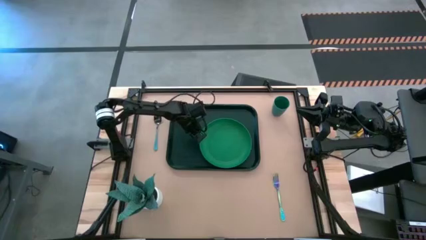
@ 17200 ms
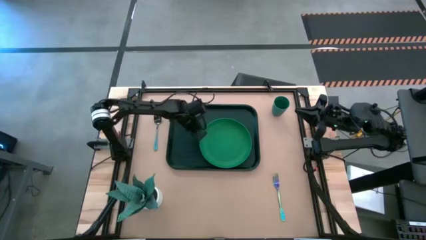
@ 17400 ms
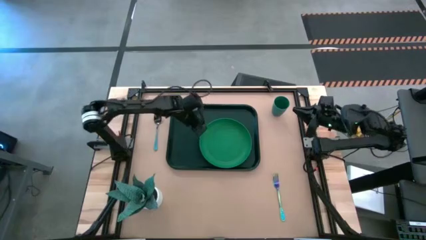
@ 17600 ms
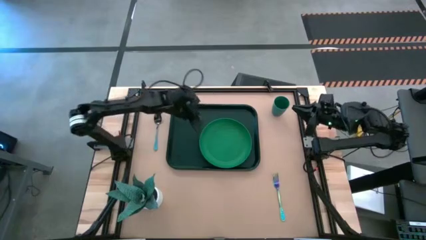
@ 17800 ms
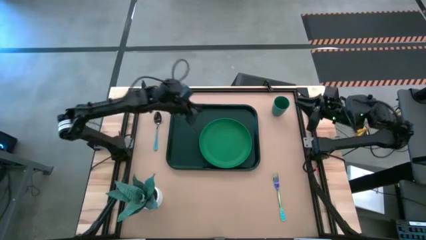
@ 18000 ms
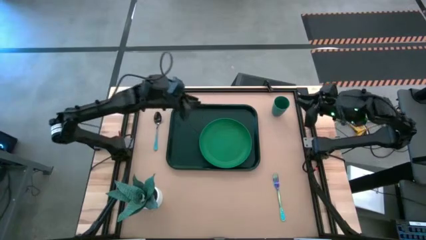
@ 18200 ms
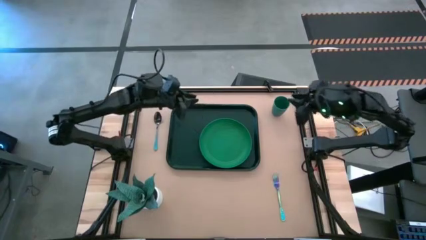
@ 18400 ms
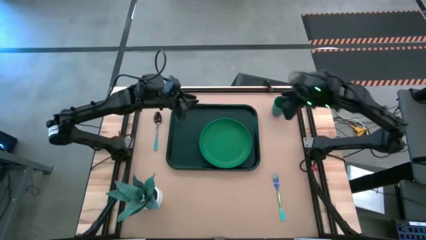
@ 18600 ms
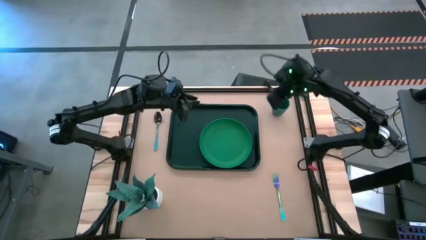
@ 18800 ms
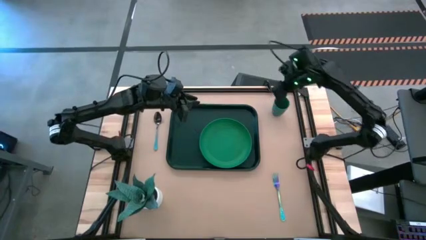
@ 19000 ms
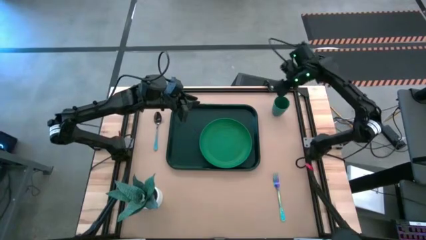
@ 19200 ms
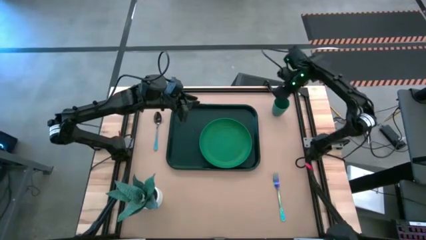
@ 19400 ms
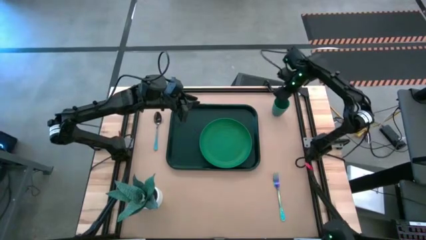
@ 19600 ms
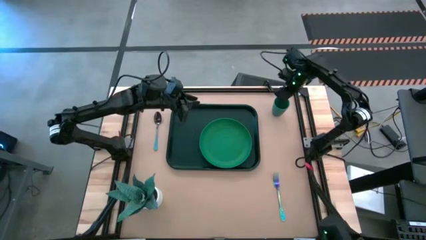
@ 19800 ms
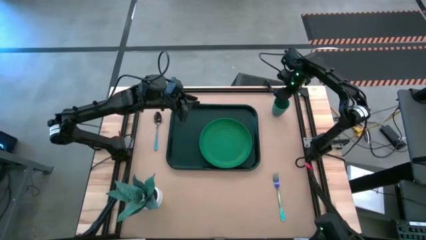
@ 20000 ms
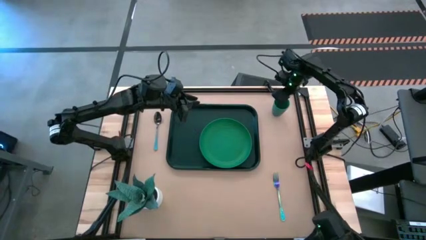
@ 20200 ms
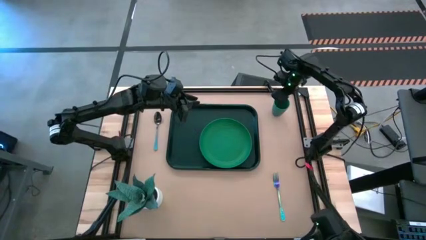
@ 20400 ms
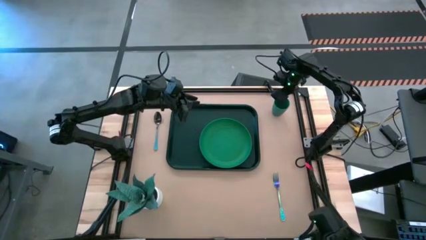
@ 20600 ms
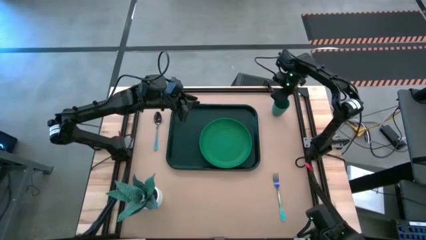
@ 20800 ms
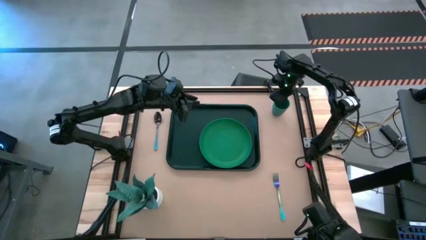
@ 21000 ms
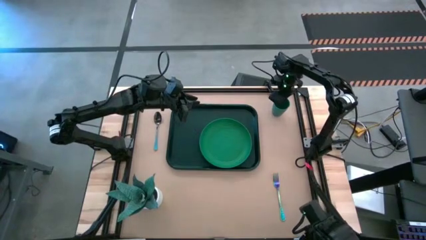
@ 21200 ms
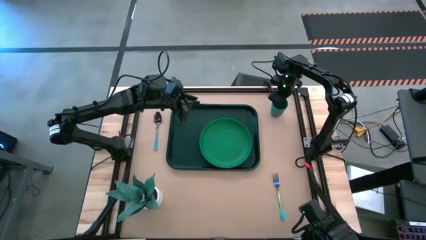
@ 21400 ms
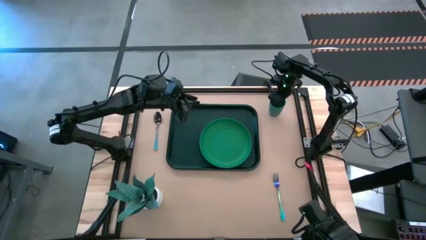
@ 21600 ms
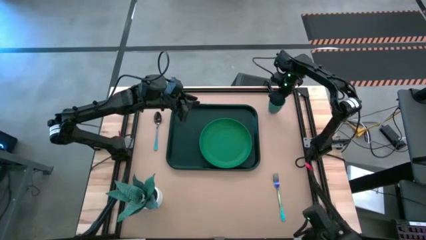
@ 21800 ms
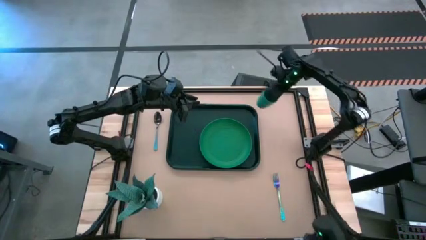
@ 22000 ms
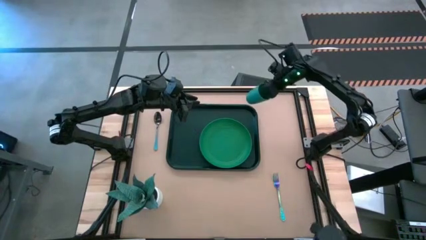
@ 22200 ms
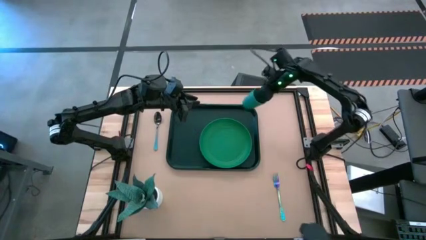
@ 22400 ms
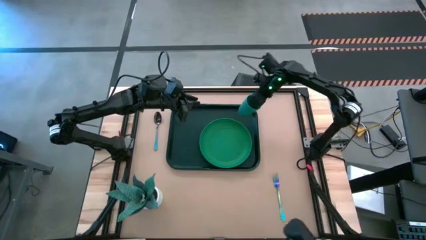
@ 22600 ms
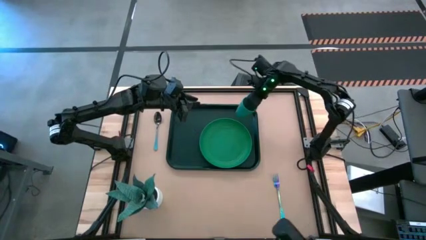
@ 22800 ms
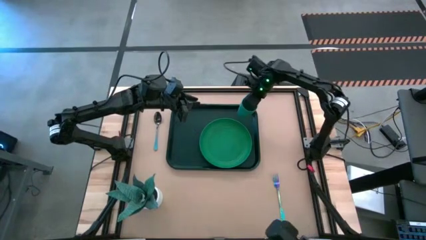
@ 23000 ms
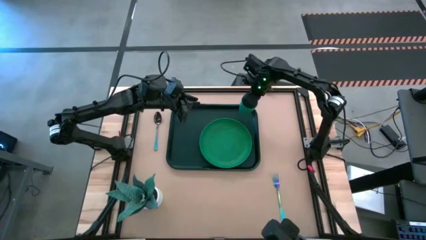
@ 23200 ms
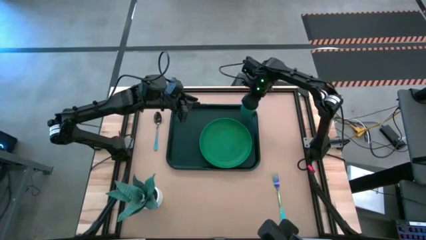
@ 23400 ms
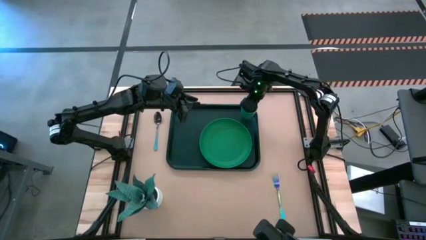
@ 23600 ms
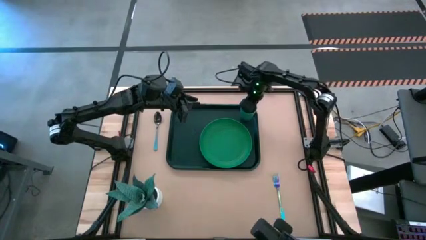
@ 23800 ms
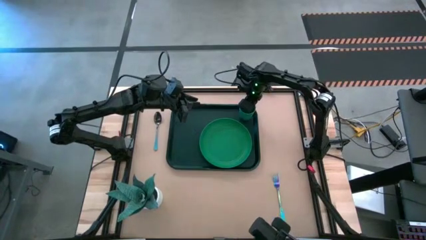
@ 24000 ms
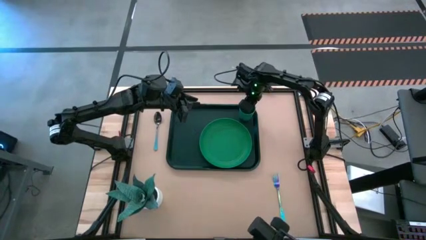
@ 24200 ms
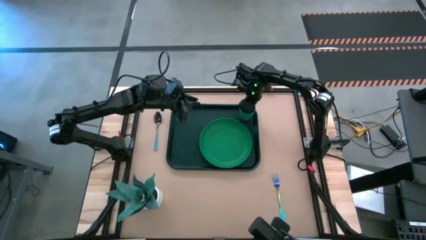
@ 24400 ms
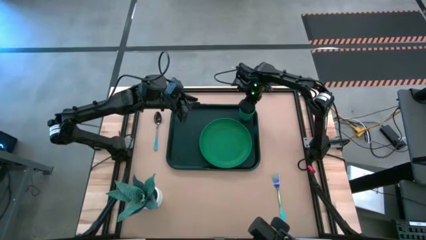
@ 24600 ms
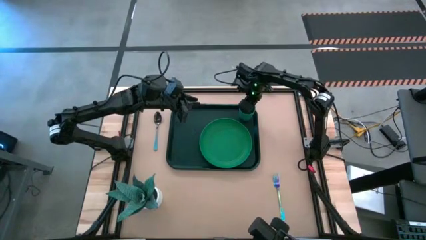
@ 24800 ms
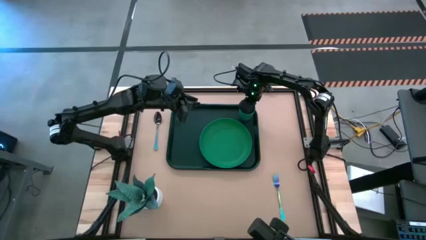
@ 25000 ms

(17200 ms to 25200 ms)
Task: Pick and place plate/cup/fork/spoon on tray
Put the green cup on the dark green tray to the top right of the green plate

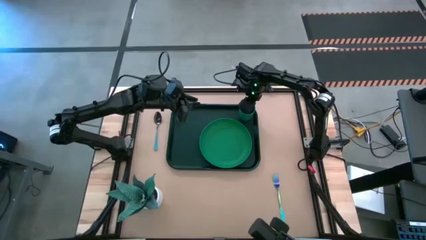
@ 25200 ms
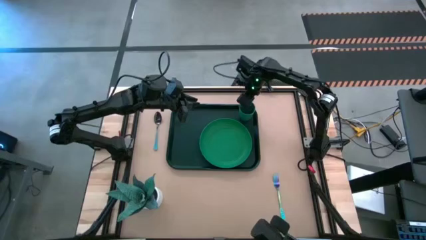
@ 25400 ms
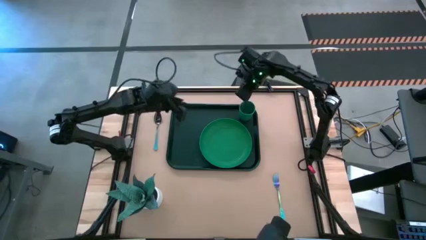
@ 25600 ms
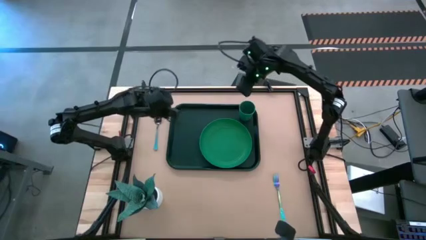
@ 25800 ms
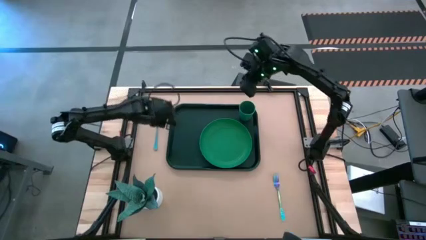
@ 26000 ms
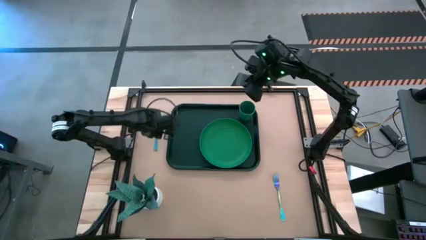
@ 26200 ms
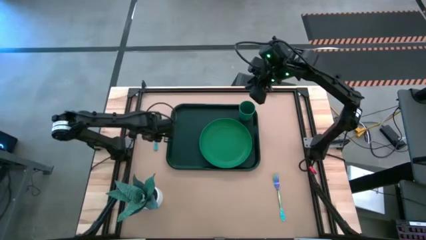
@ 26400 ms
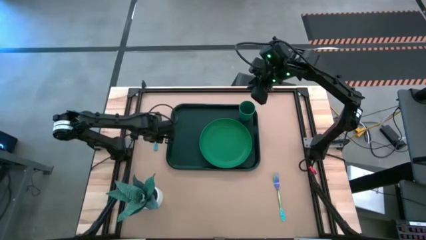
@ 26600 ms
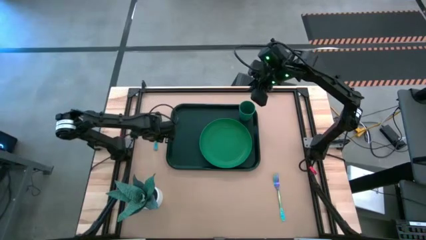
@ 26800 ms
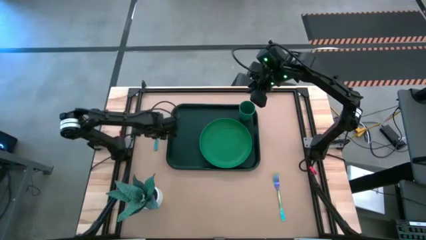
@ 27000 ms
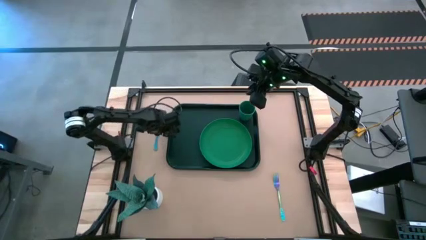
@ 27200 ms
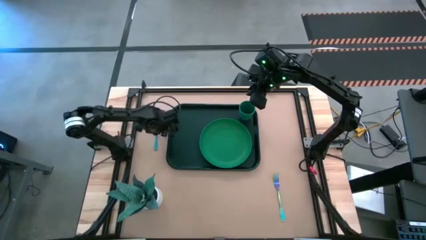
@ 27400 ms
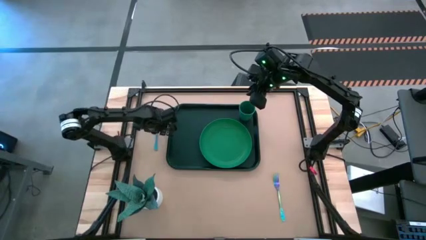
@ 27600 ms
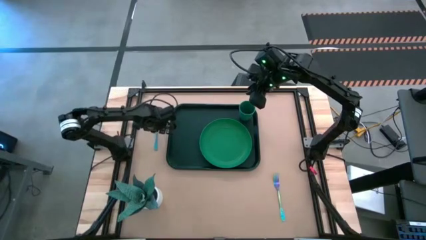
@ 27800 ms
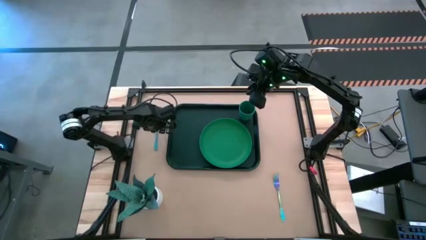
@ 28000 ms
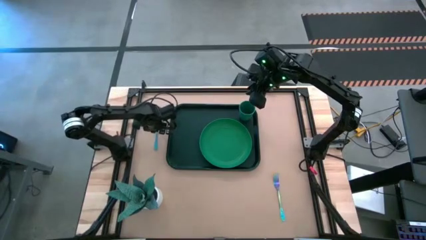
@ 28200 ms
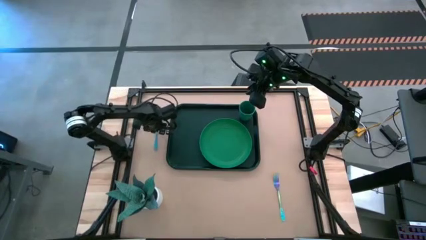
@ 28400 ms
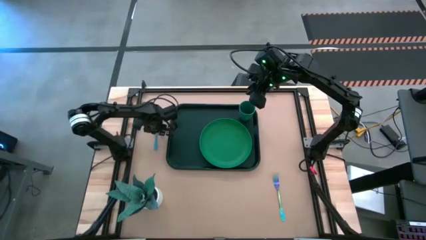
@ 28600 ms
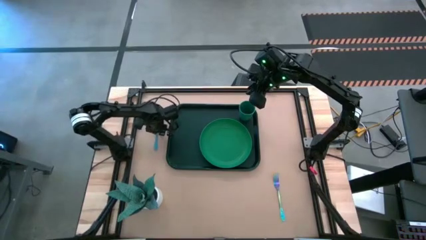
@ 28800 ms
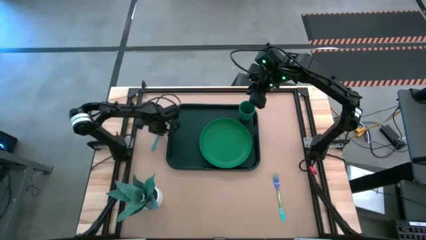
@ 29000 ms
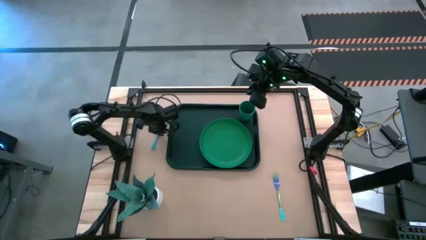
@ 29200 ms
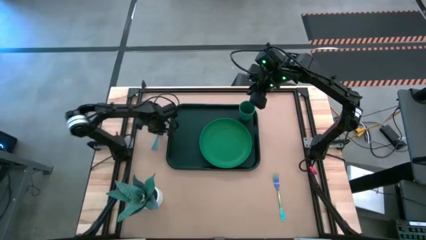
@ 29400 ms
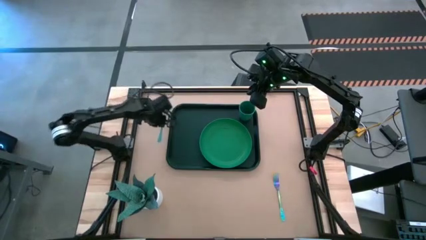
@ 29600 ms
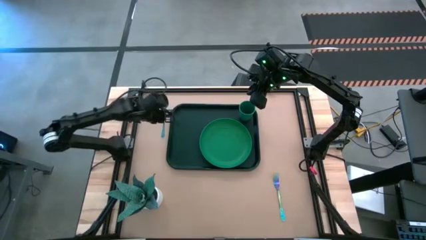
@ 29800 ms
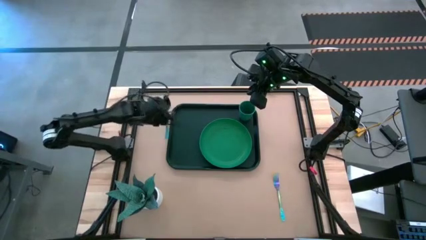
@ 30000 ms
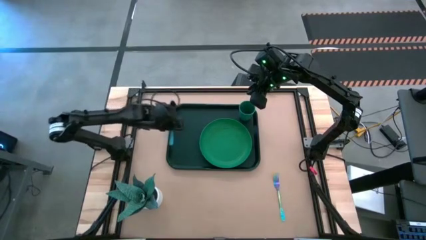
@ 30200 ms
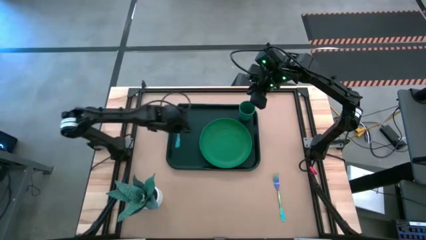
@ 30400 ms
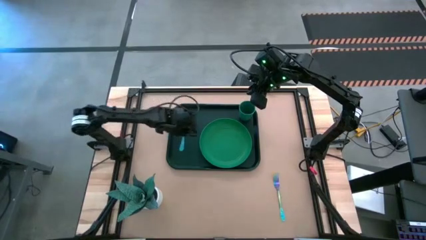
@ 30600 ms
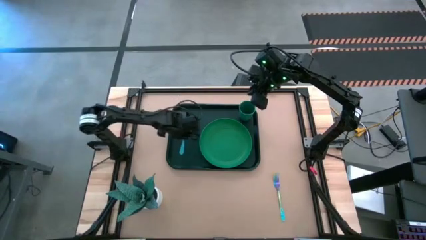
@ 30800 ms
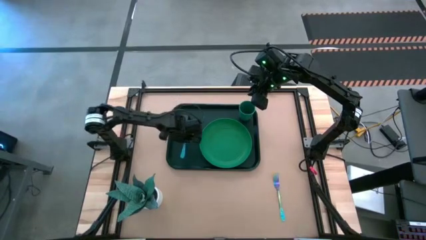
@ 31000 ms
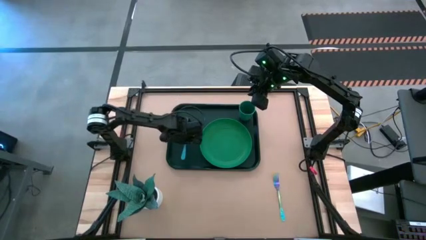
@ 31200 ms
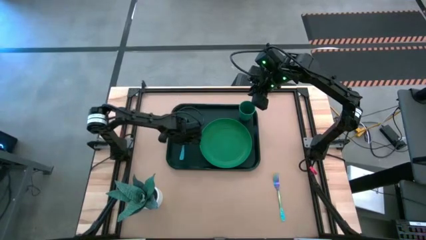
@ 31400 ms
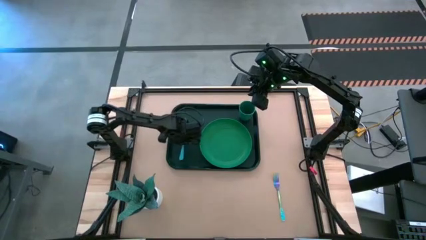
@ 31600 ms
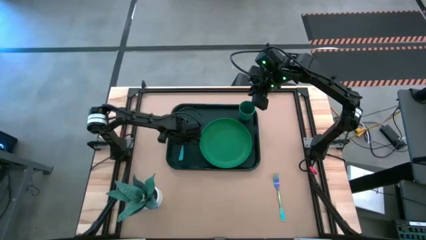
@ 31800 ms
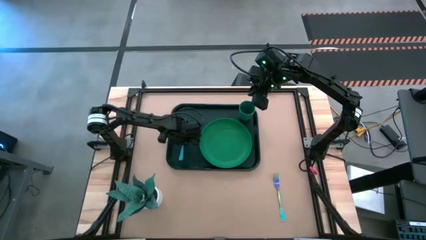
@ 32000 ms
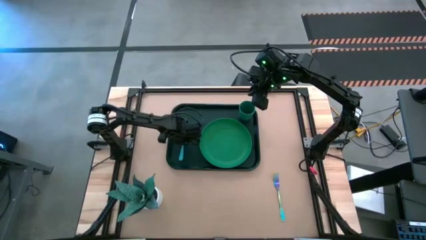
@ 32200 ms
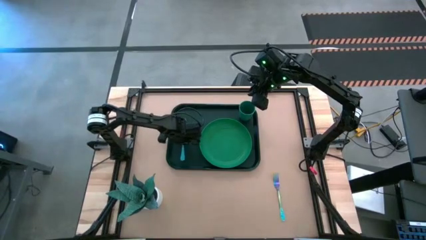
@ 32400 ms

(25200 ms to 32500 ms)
Put the blue spoon on the dark green tray to the left of the green plate

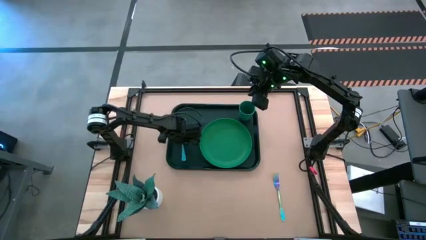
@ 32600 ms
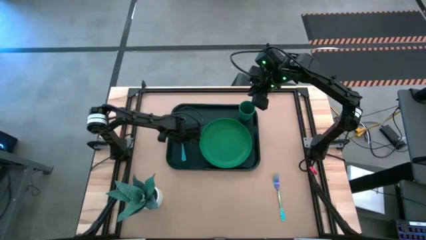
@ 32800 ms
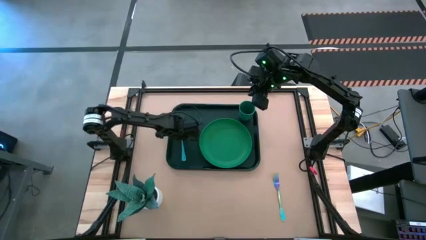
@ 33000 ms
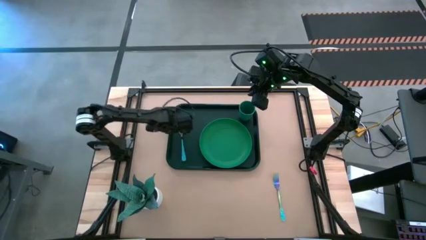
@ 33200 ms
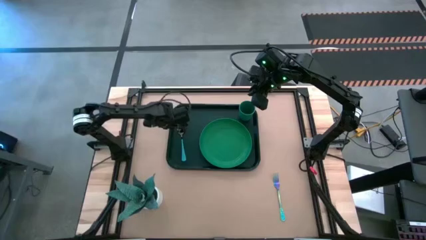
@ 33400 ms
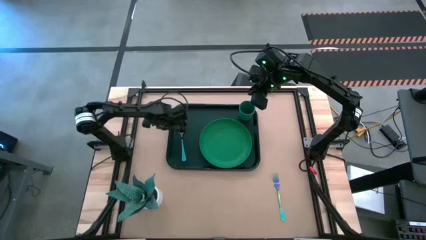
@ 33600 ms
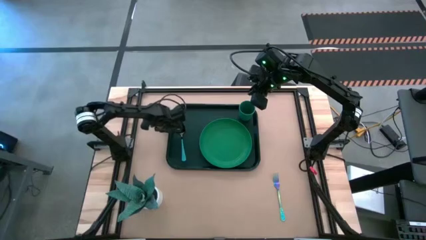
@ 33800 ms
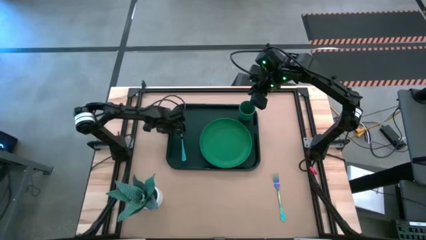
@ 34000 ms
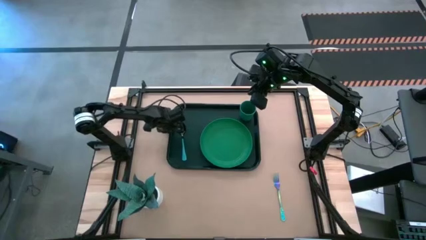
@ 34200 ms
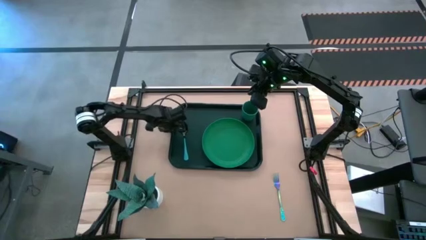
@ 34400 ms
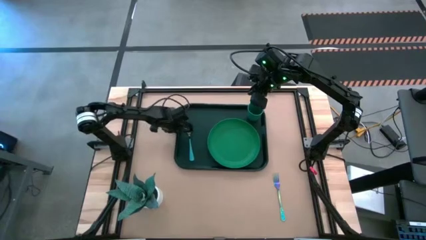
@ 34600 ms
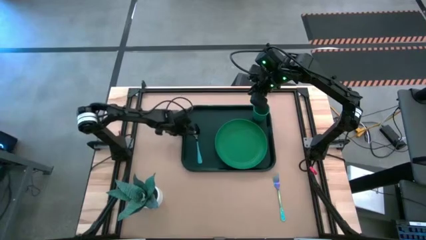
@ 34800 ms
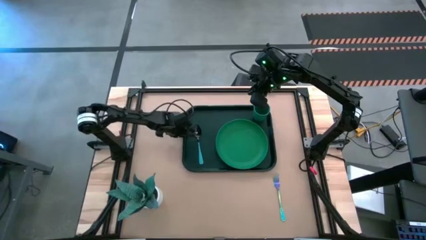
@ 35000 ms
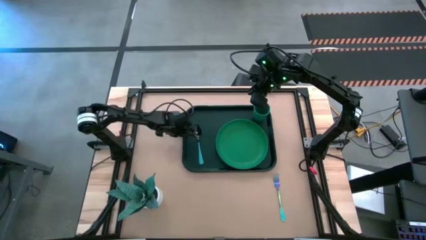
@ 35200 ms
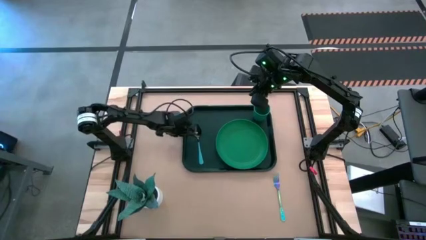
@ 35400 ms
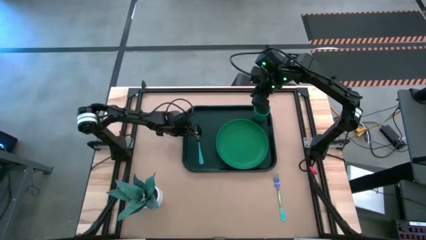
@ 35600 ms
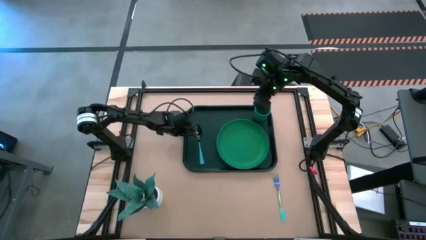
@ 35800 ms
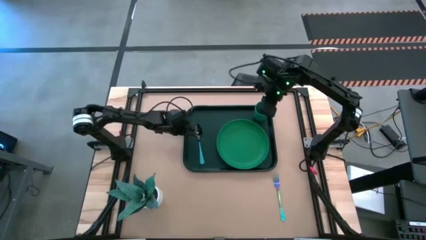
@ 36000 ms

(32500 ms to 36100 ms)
Adjust the dark green tray
